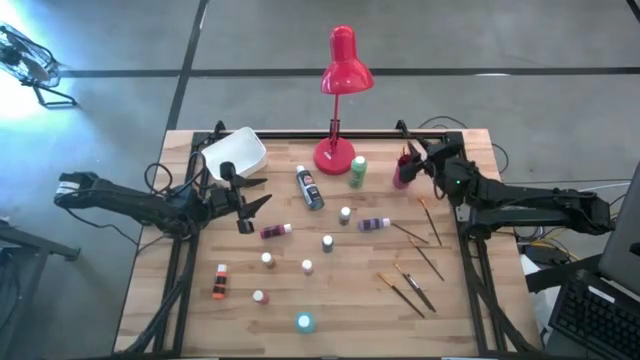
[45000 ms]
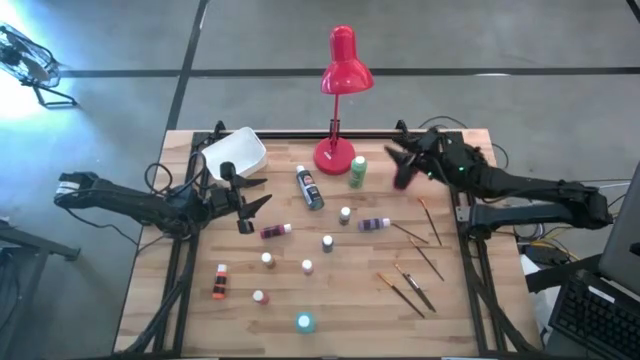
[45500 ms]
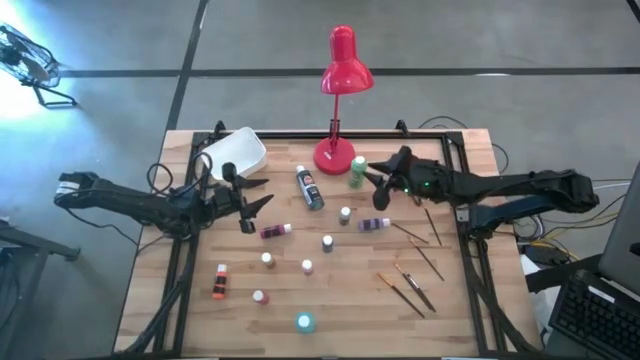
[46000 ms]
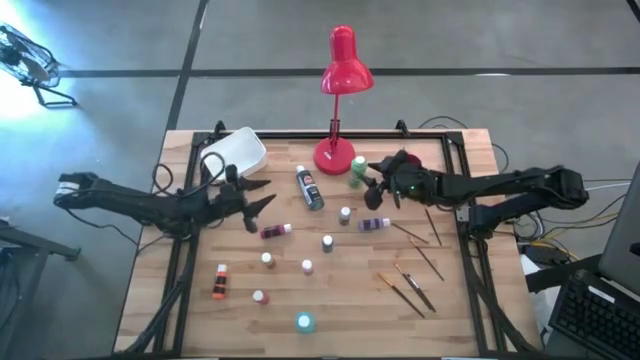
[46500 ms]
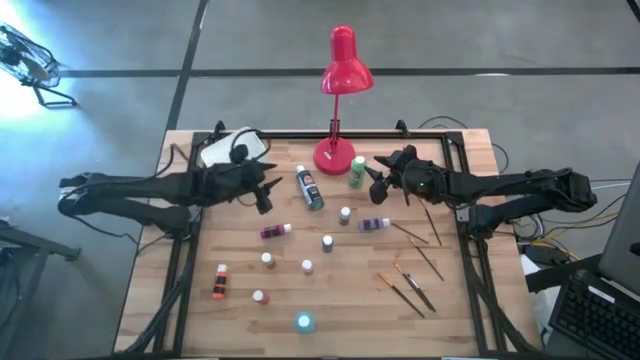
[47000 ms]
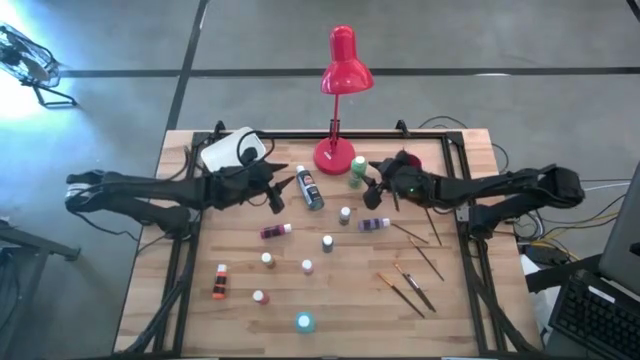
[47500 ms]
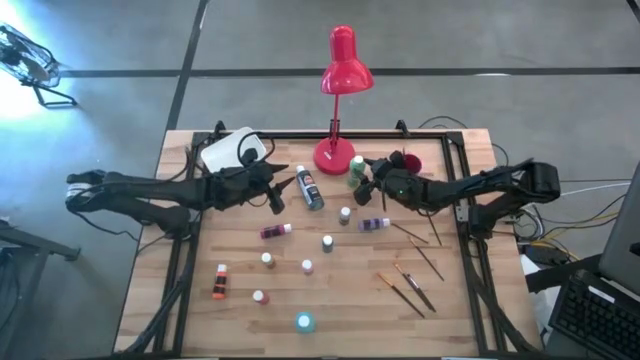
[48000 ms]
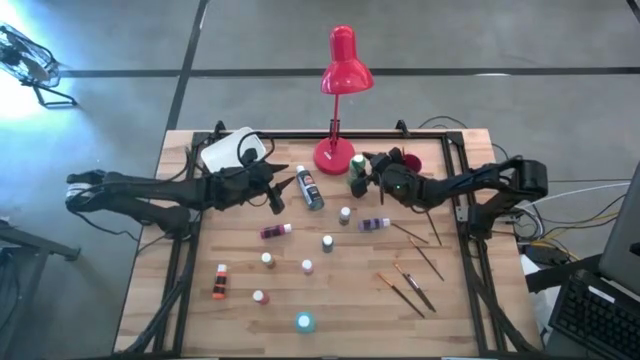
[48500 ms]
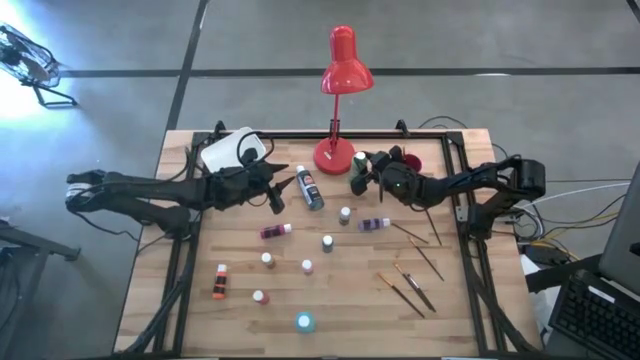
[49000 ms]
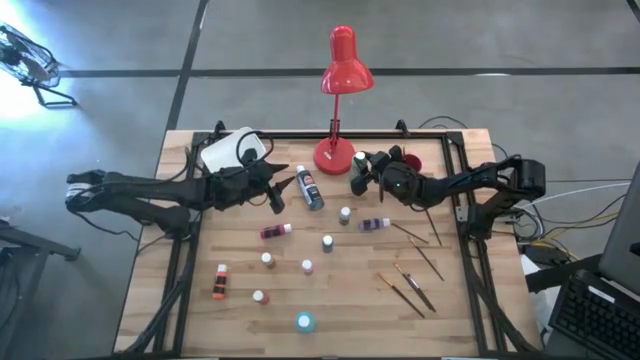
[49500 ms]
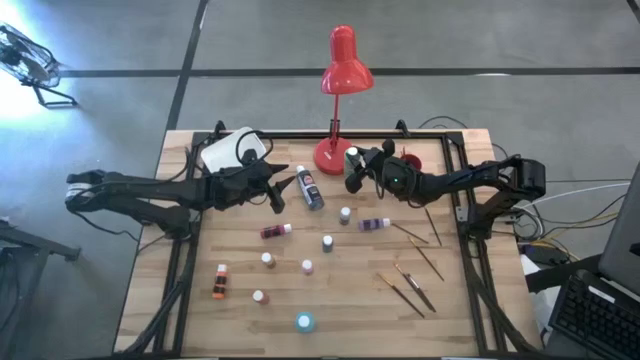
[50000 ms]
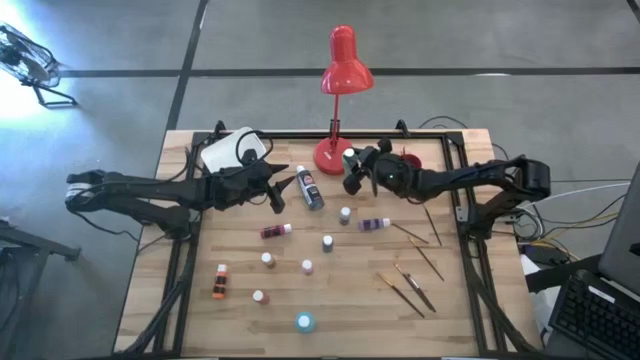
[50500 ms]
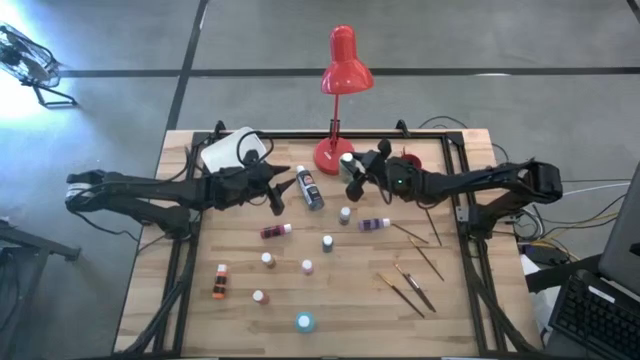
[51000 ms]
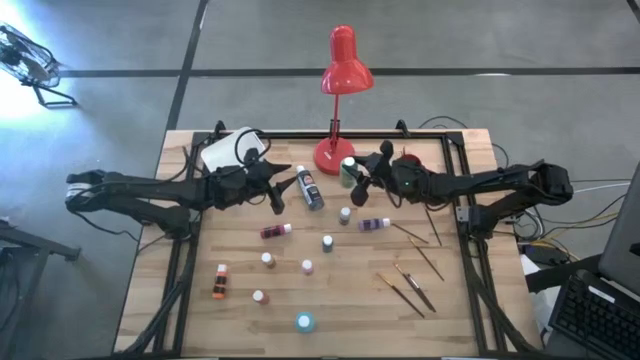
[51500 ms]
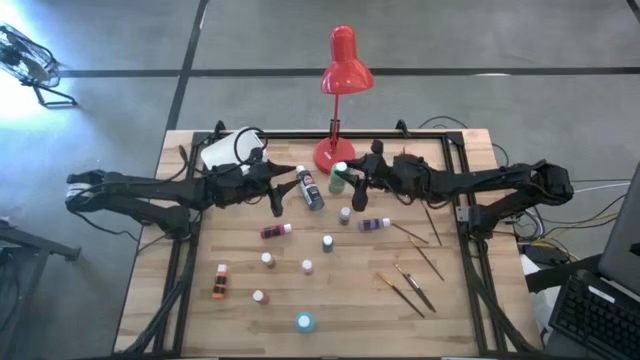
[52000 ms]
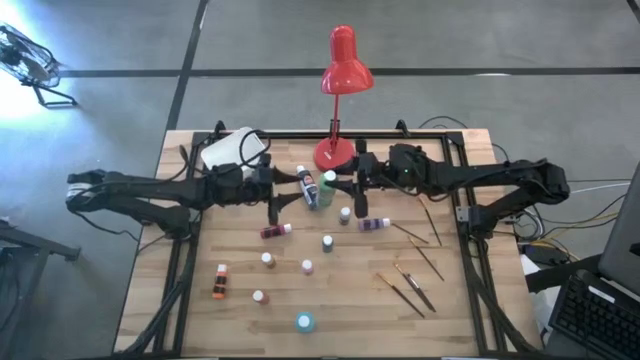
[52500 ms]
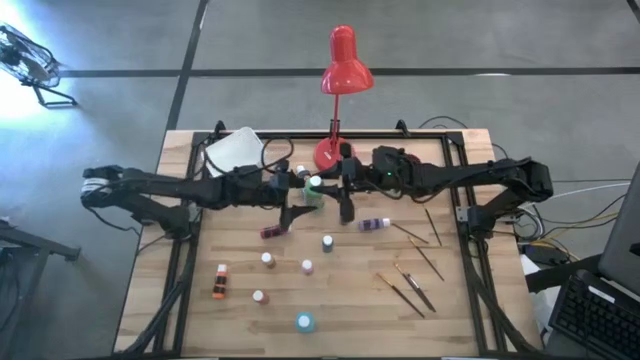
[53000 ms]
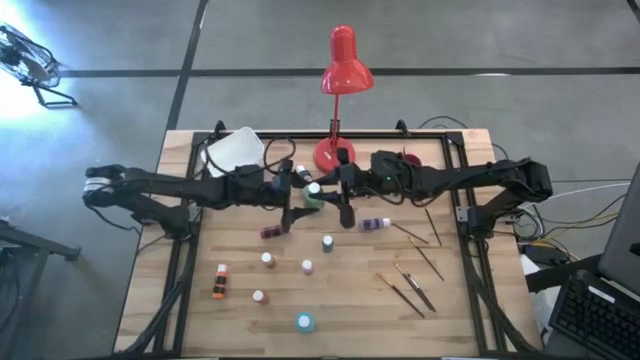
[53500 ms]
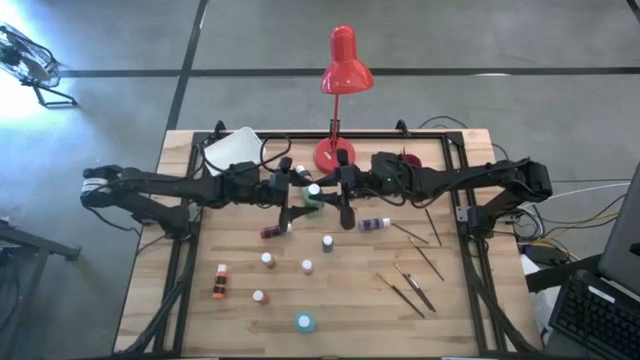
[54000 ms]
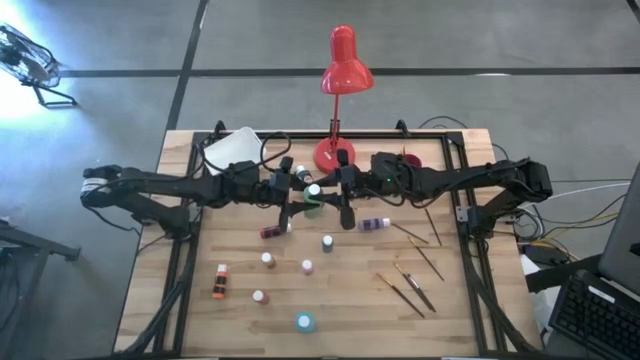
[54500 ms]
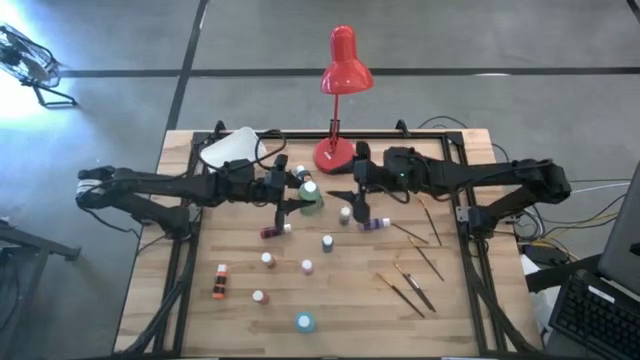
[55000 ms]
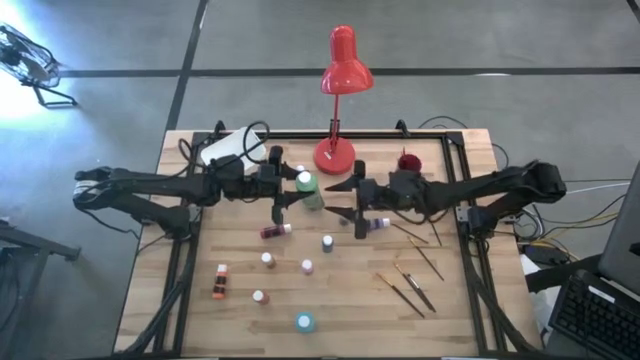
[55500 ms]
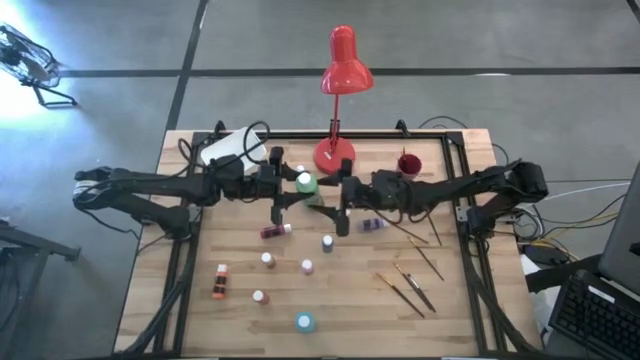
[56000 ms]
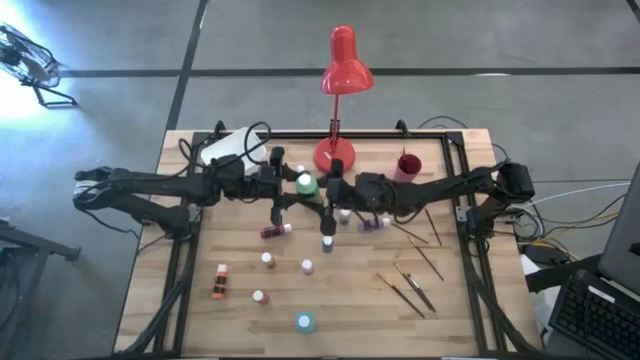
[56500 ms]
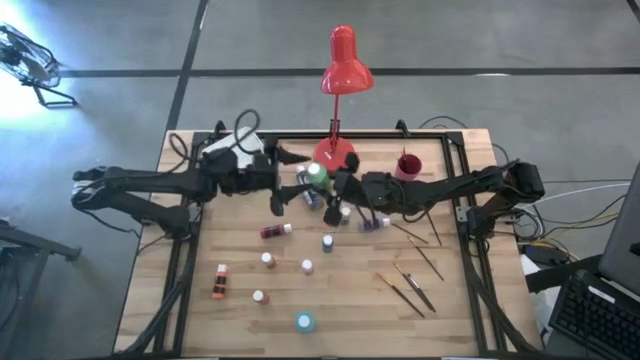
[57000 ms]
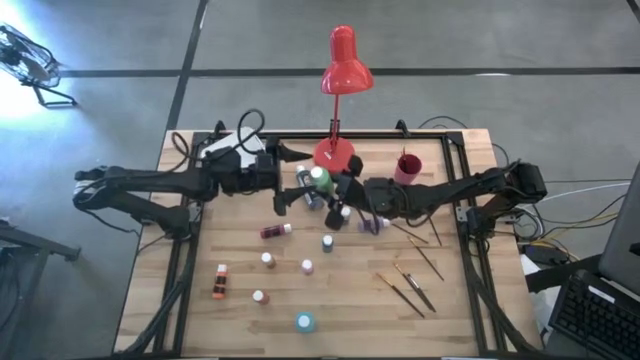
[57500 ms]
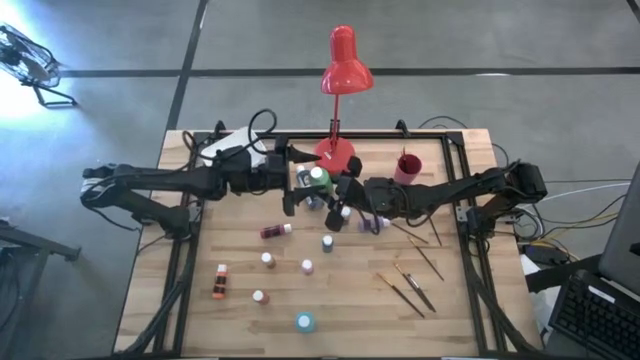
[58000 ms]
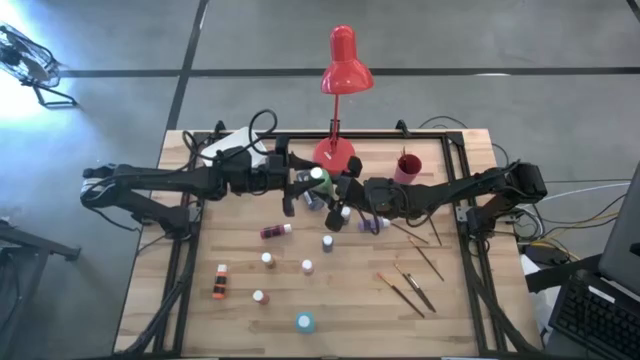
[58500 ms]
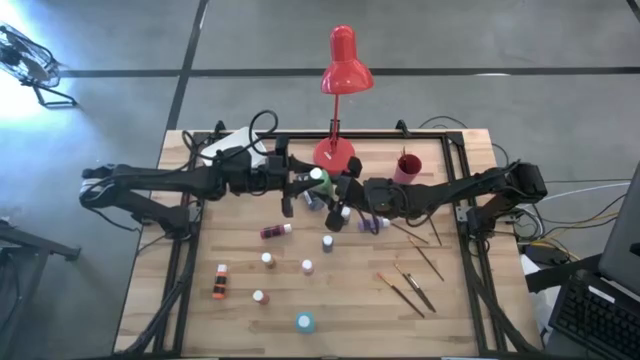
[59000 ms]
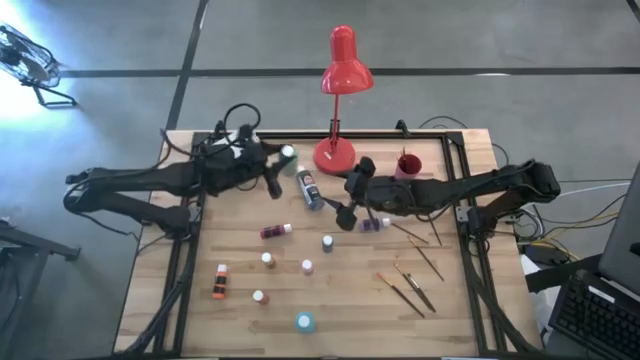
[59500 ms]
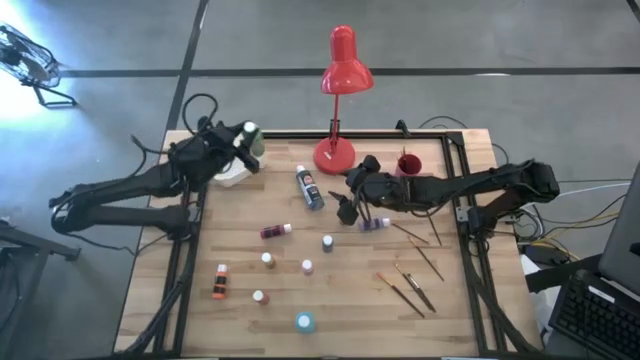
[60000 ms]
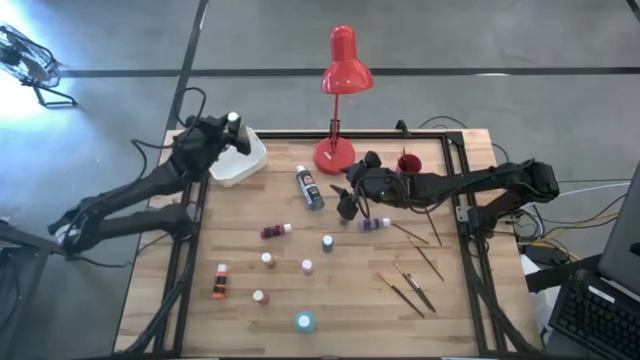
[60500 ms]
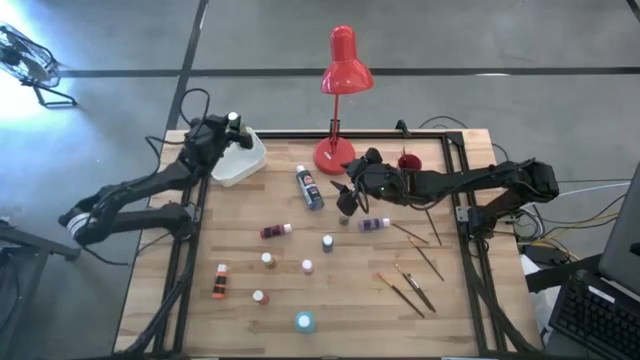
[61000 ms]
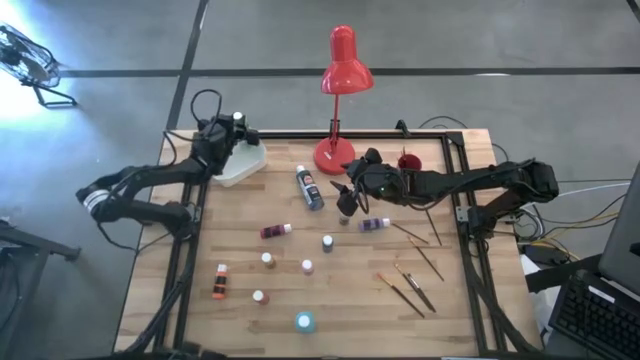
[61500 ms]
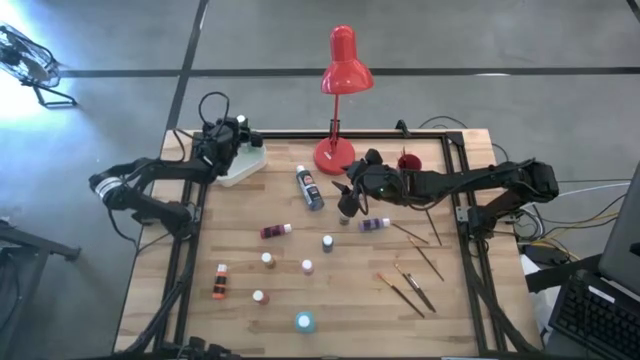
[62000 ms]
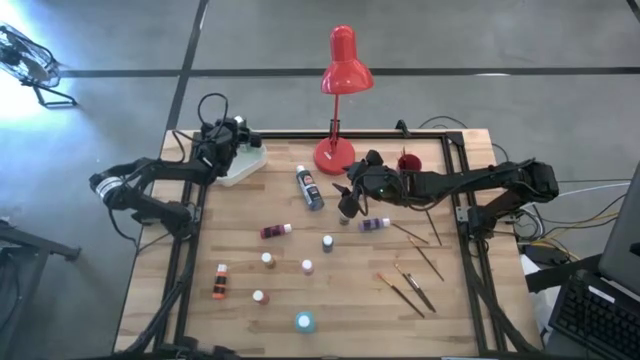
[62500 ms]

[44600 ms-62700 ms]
Task: Pick & Place Paint Supplies
Put the green paint bottle into the white bin
